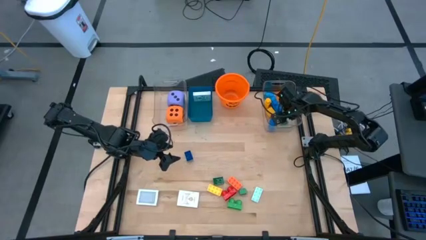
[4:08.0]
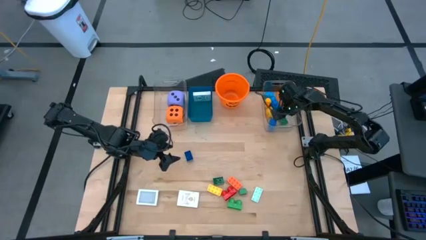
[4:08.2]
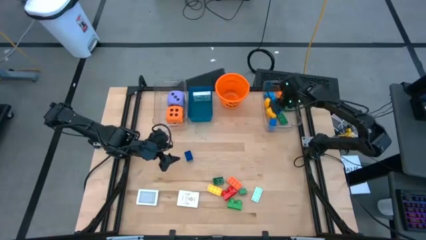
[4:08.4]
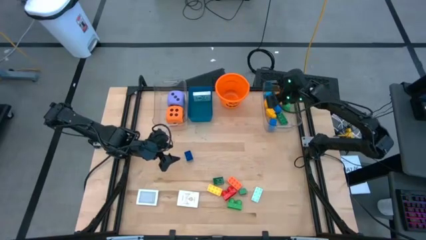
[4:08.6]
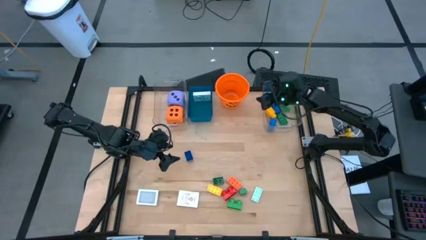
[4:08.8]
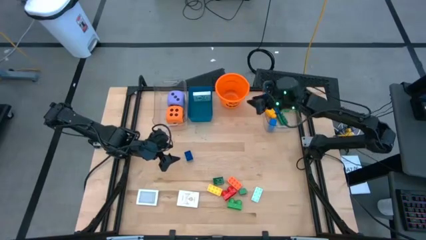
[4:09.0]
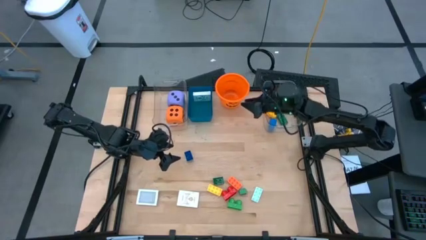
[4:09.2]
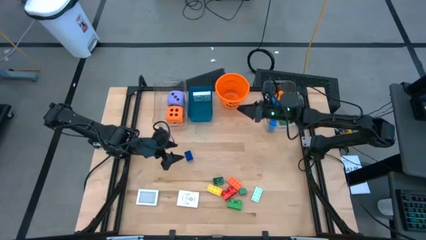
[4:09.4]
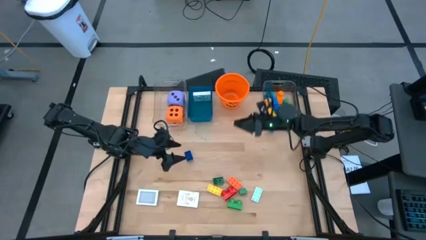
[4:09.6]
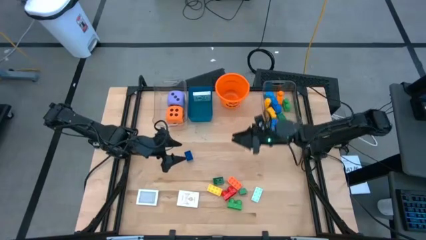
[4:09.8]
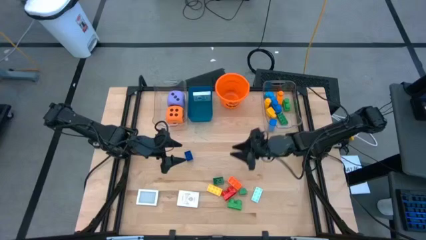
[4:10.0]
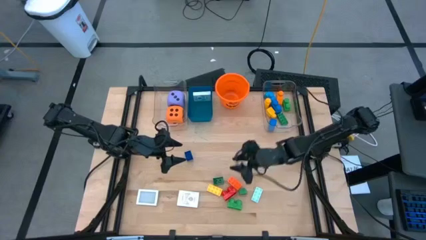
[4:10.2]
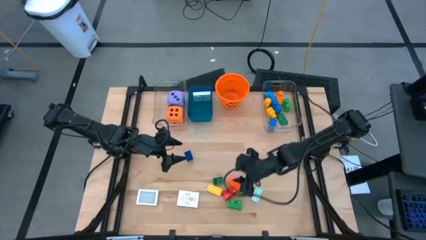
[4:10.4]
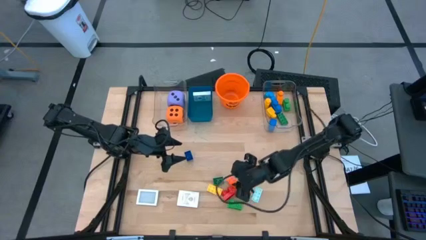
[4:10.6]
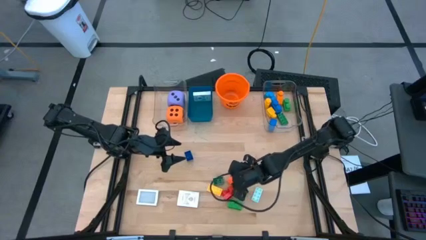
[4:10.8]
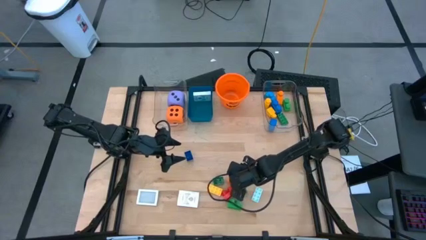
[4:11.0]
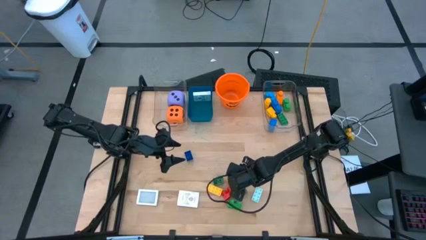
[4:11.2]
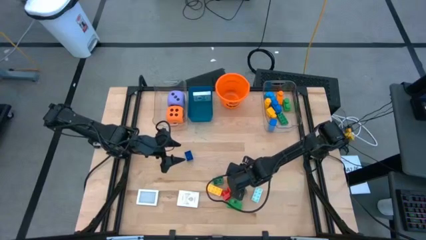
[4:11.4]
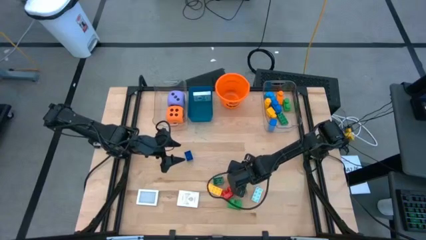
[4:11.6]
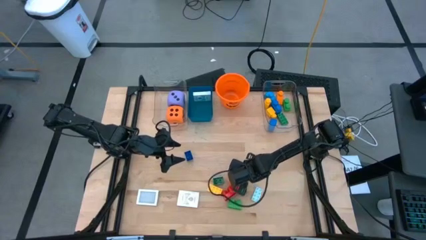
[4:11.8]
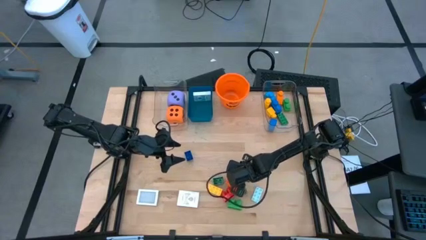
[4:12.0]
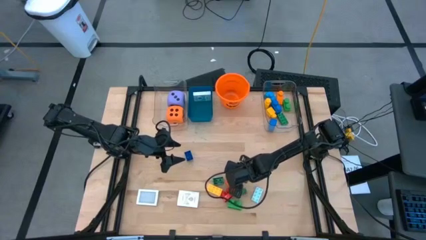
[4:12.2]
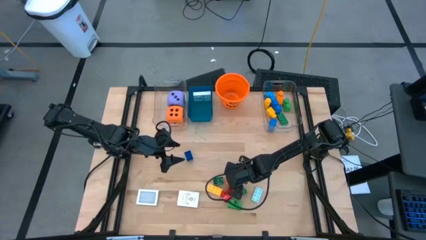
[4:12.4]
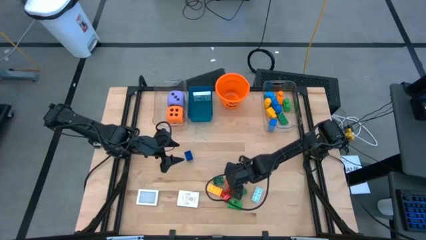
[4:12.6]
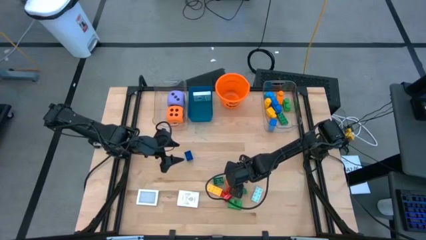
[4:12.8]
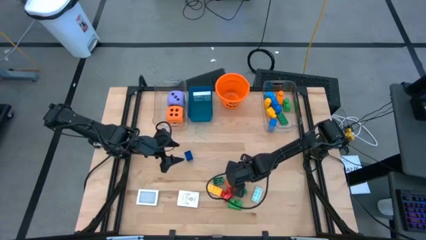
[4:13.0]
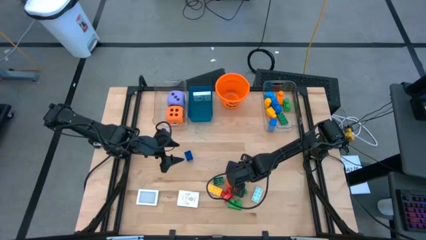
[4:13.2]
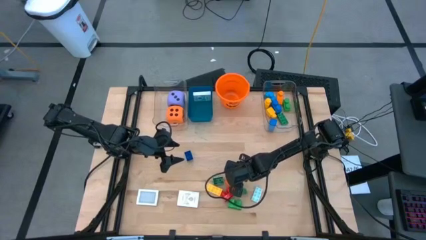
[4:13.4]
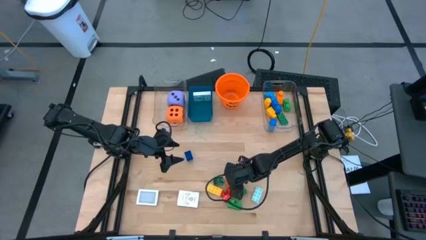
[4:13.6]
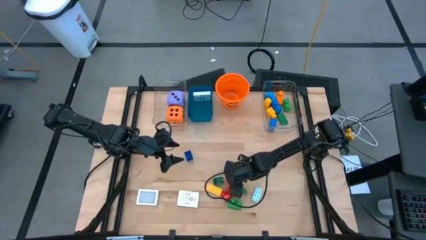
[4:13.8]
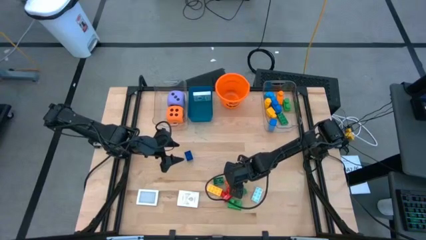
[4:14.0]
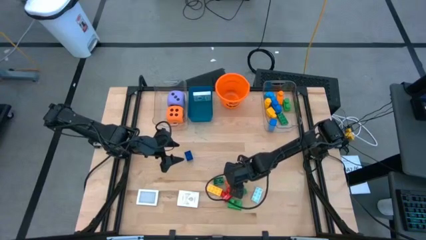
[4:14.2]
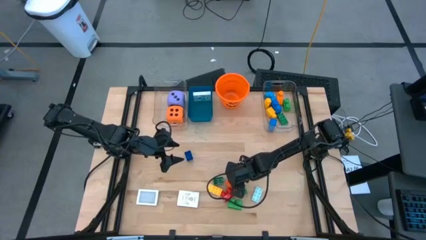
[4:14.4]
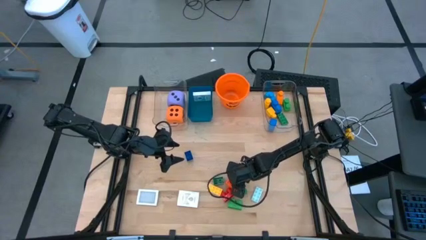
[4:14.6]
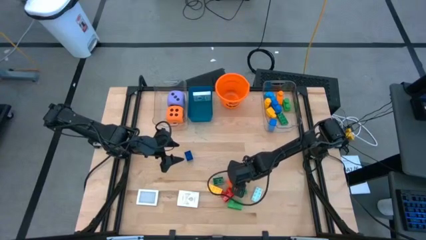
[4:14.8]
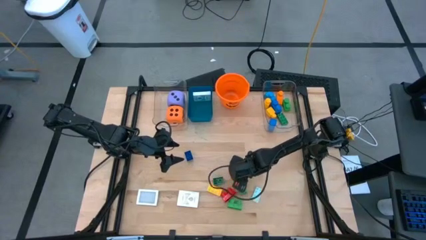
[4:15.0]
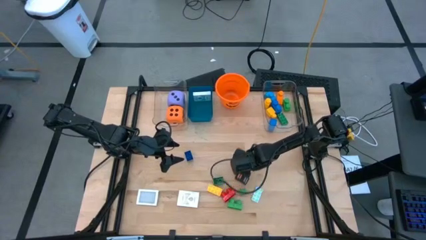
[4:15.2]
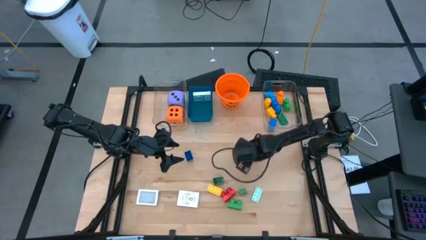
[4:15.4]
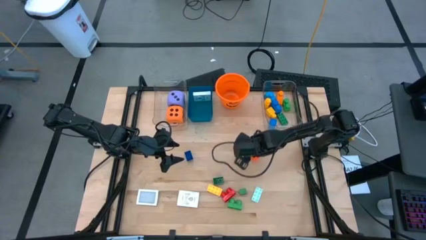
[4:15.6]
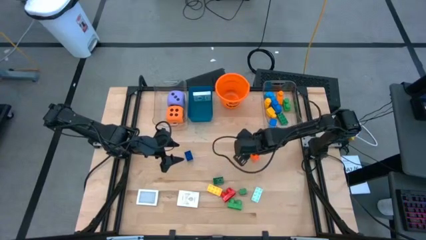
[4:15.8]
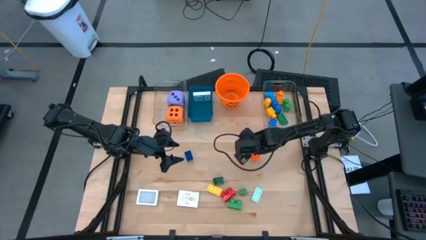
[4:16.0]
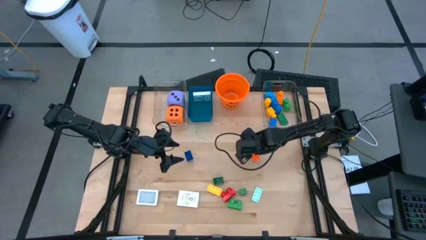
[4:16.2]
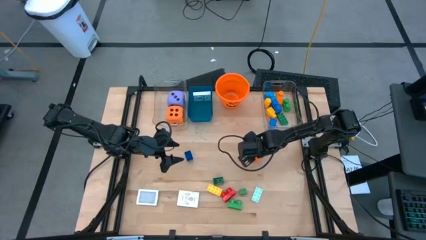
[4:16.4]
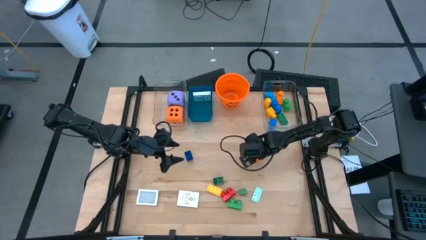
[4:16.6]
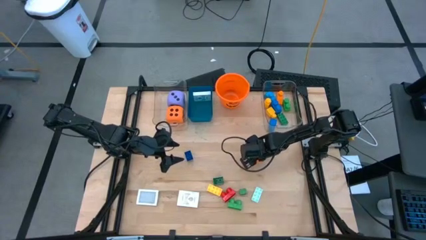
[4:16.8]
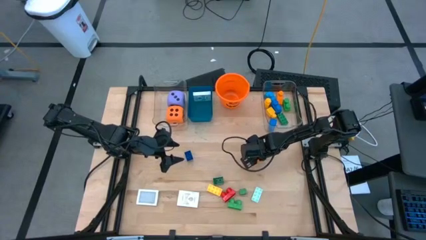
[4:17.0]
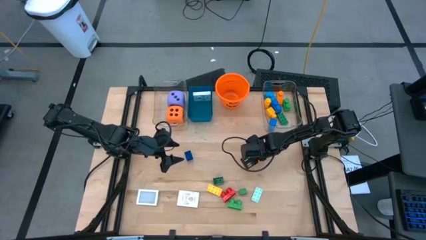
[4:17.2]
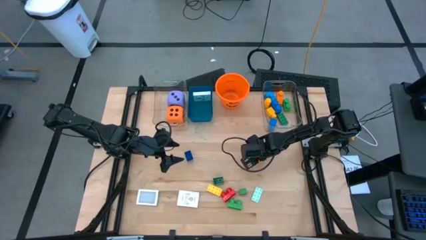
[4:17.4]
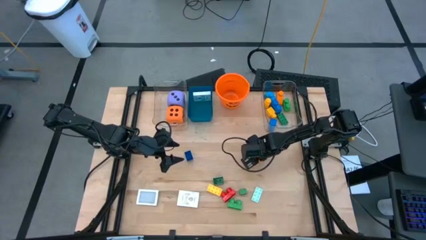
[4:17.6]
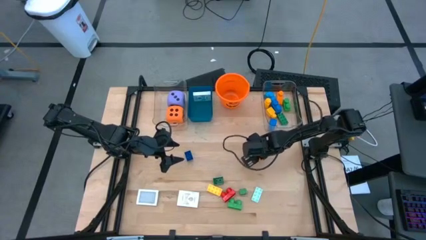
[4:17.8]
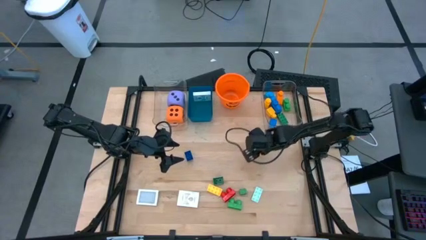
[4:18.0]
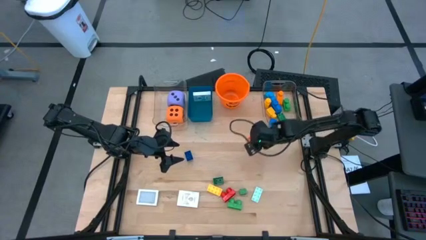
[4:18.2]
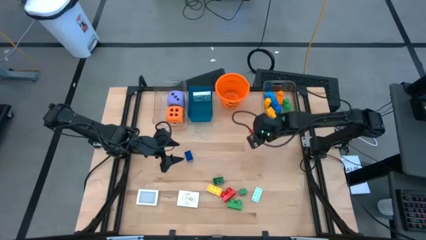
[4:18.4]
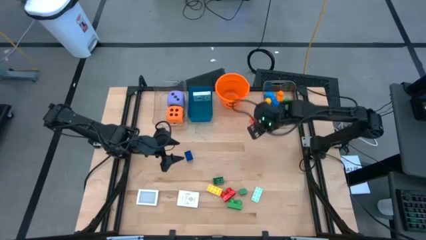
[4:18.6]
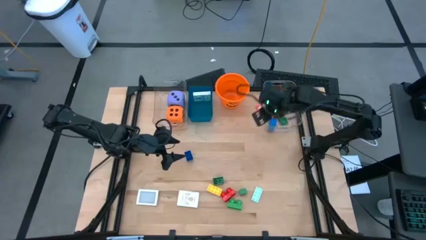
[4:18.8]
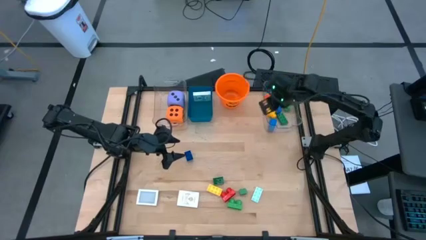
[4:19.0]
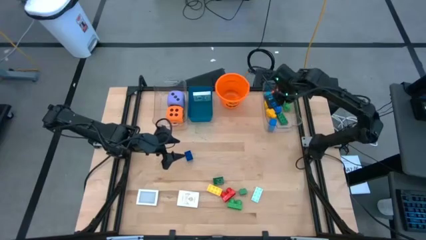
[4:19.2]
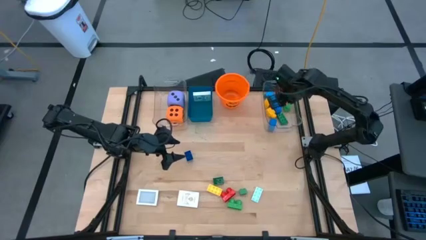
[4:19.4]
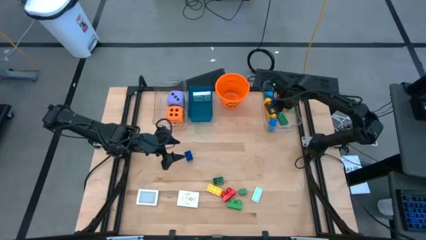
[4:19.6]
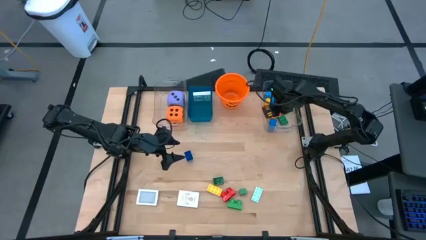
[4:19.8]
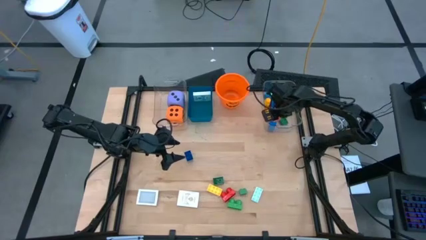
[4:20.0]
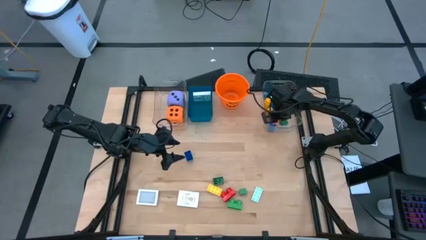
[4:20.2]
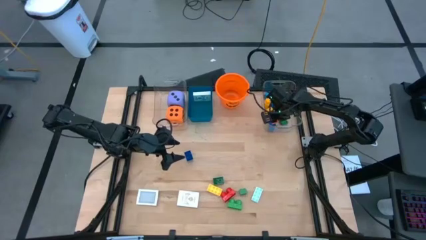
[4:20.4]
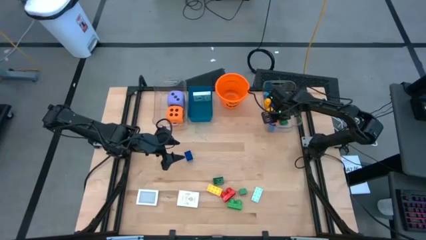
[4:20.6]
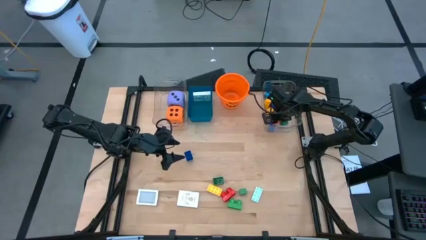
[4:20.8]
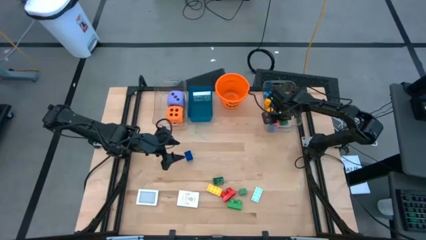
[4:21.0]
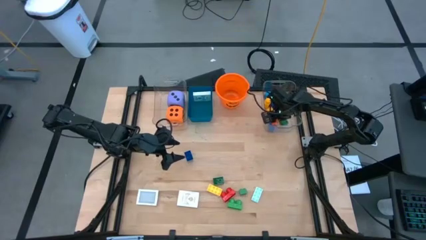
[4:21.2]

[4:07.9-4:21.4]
Task: Pick & Place Toys
Put the orange game piece into the right transparent bin

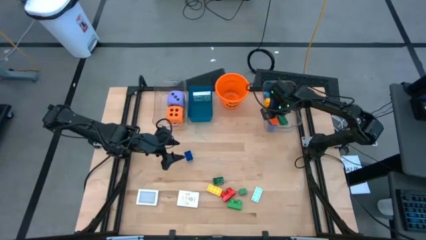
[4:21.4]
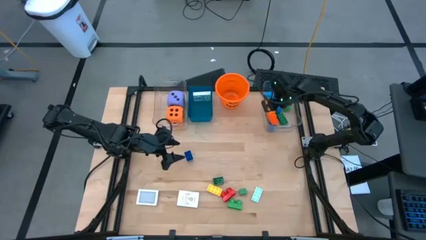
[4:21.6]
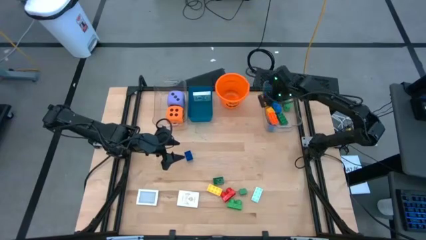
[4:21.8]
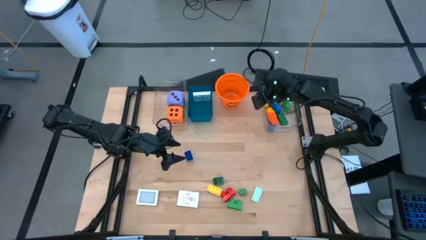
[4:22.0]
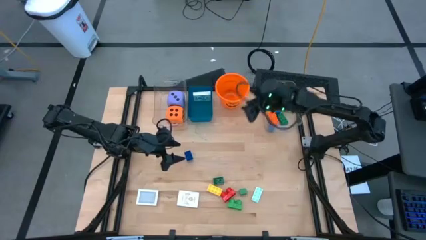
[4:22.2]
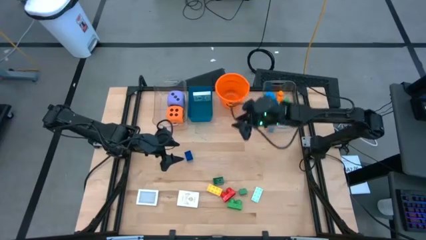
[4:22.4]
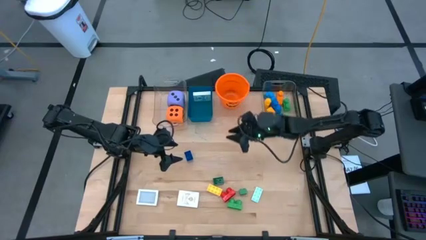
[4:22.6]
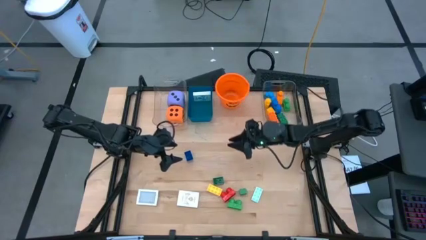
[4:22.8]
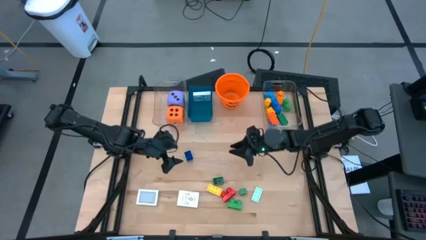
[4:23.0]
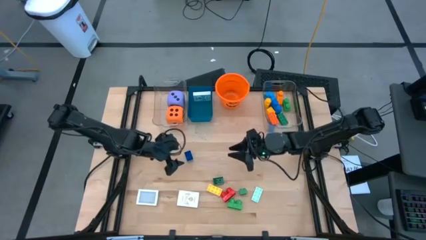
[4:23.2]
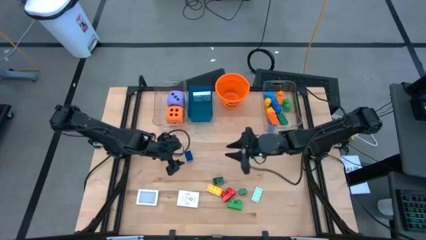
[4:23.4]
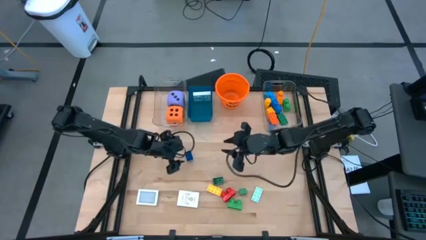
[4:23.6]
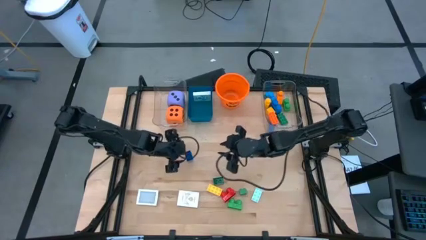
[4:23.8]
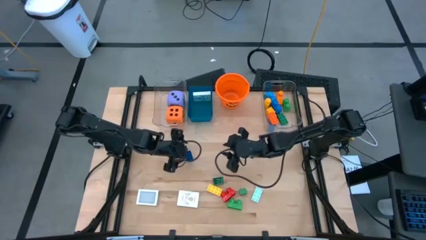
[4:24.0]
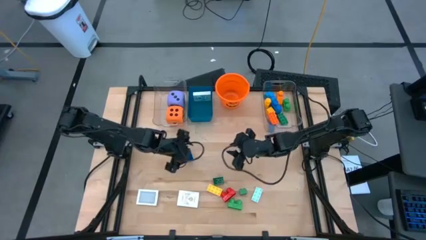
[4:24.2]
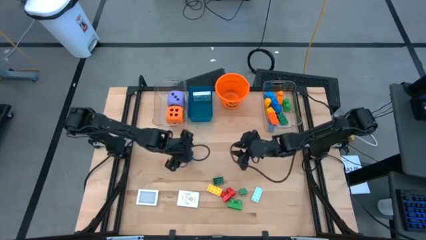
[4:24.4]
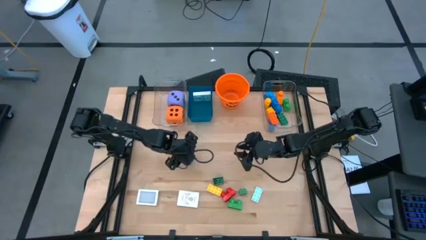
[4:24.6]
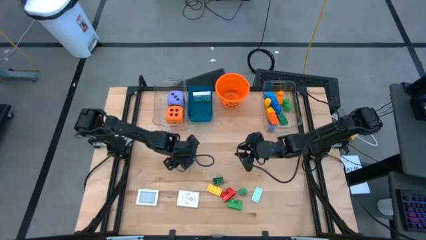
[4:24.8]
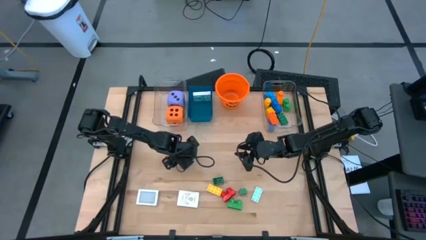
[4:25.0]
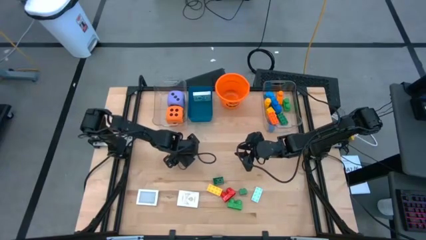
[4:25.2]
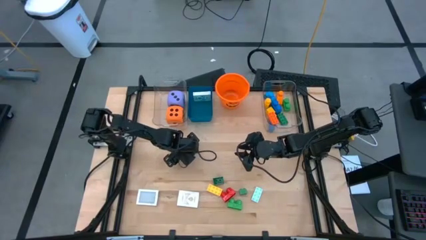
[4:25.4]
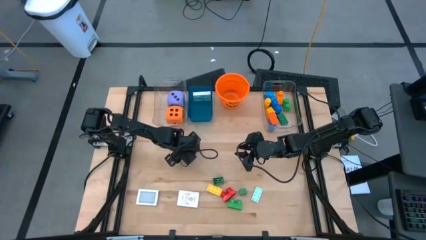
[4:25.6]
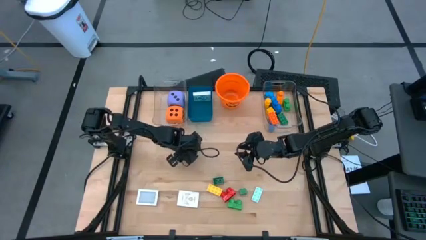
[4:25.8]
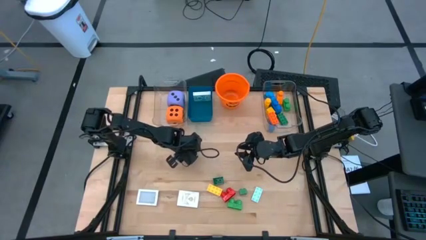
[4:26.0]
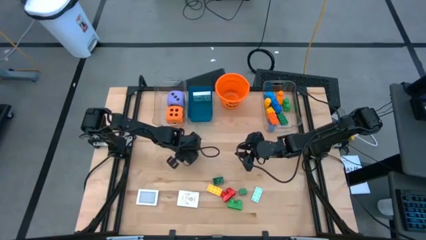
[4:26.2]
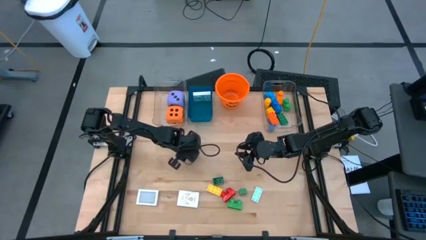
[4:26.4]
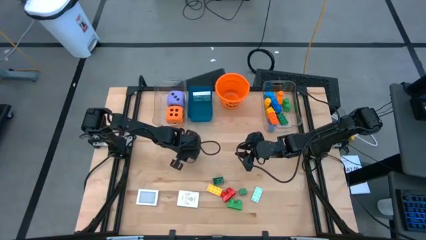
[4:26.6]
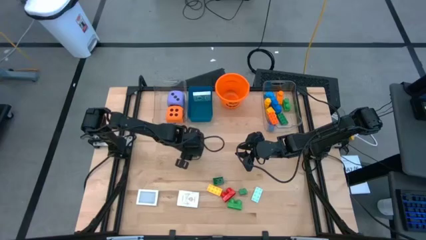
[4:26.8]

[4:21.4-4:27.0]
Put the blue game piece into the right transparent bin
